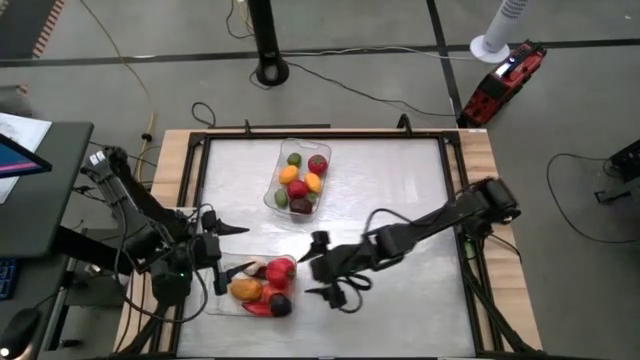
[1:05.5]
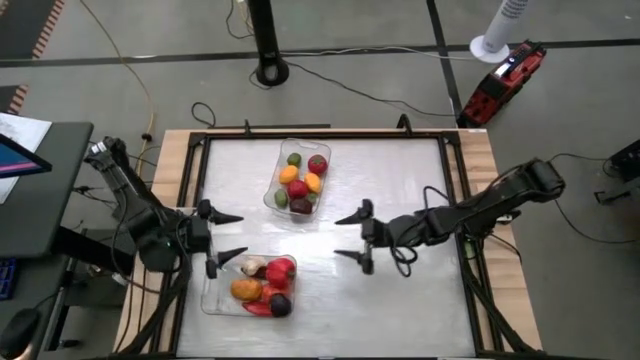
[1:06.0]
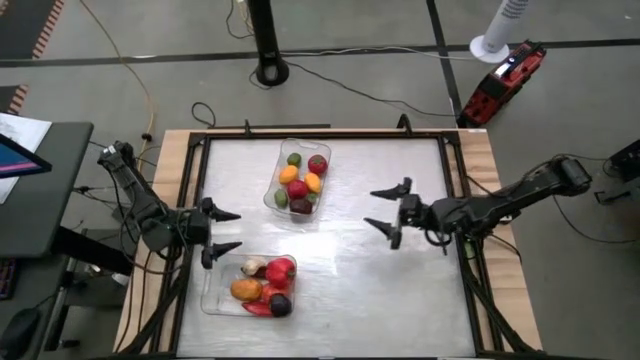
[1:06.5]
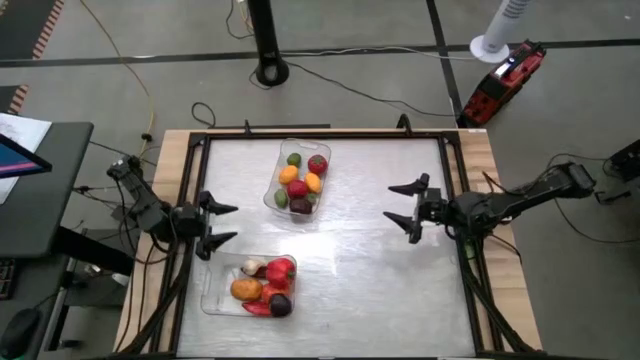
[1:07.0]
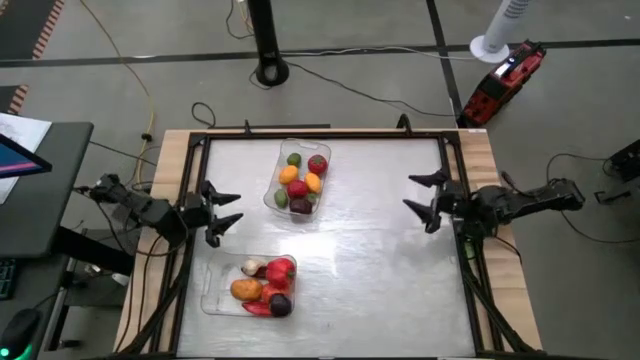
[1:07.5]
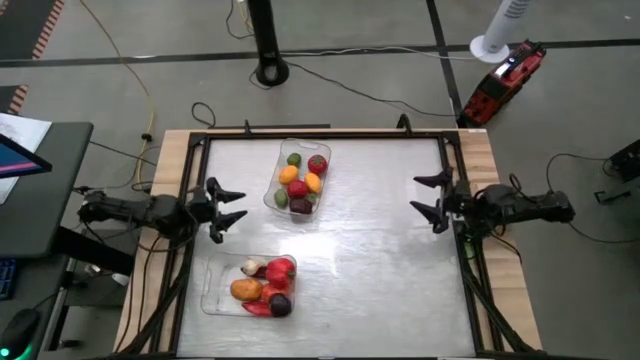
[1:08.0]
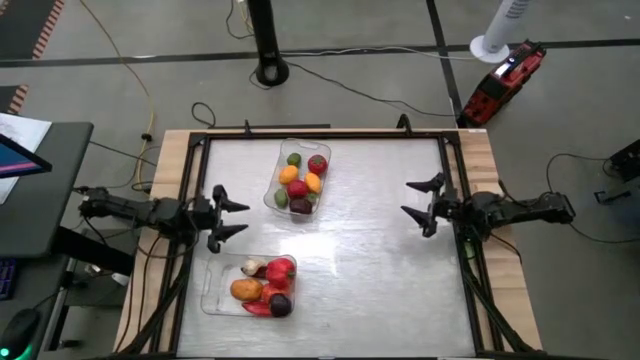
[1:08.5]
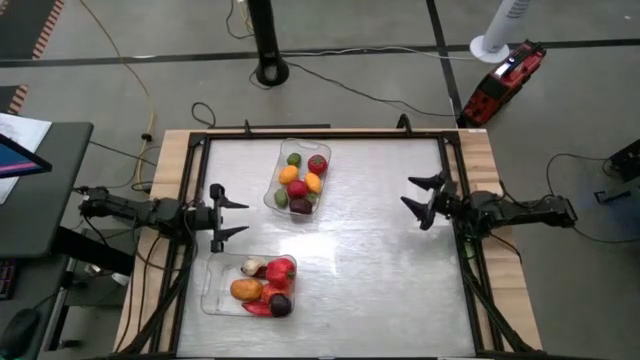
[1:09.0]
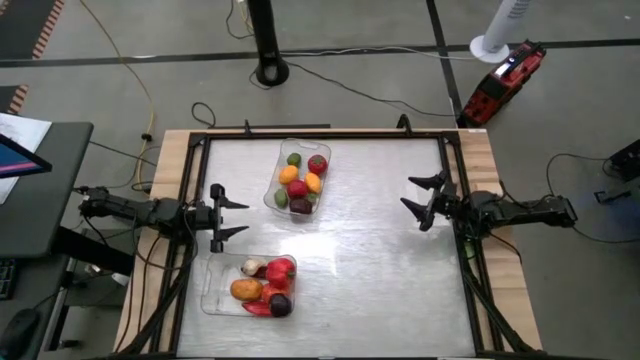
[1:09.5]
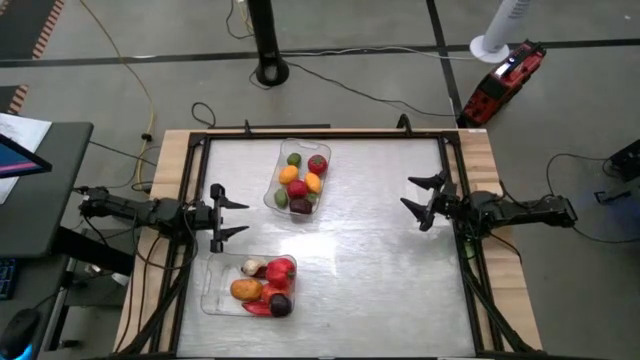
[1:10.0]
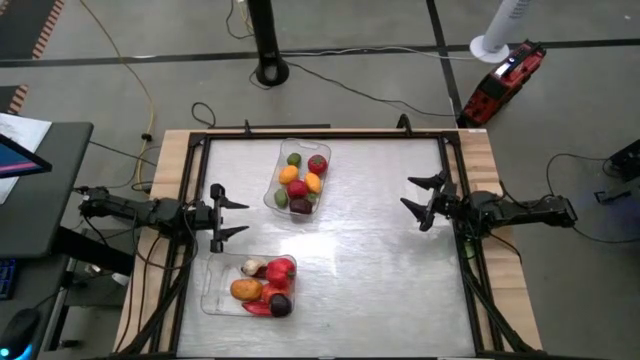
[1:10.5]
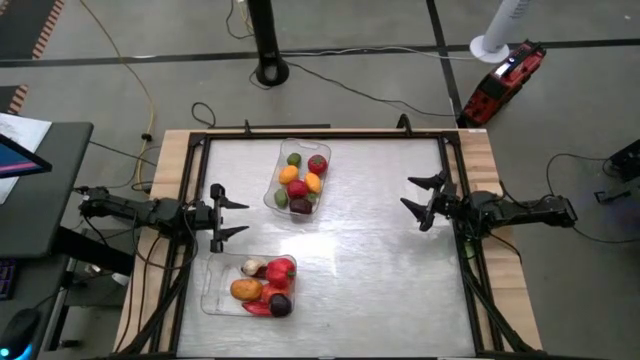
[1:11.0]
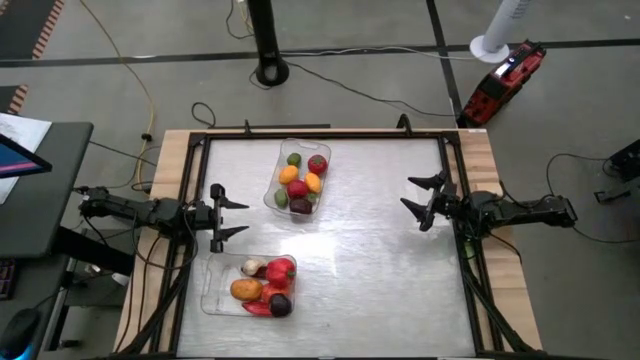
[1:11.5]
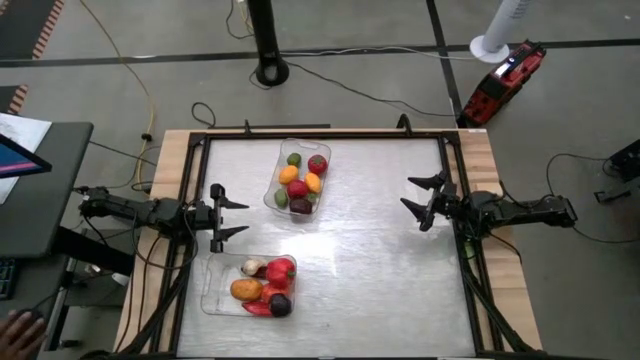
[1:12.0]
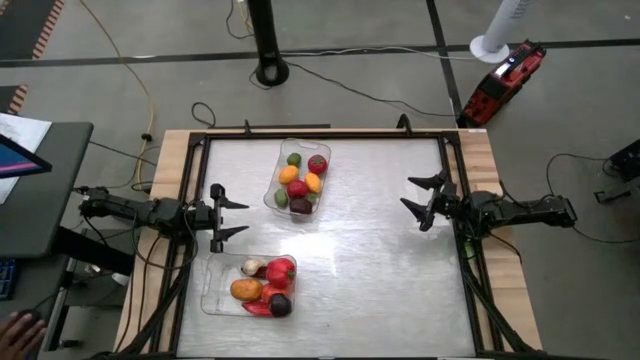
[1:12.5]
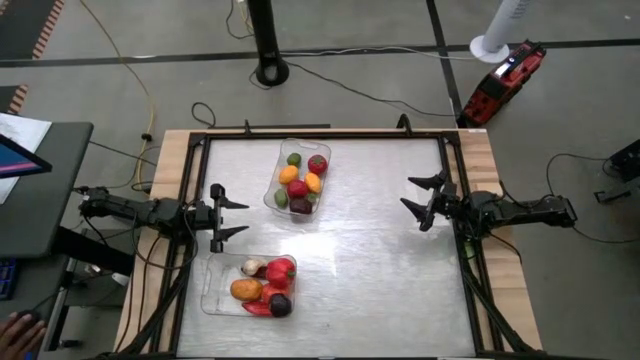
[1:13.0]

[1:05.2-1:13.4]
Task: Sort produce into baskets
Return to Home Position

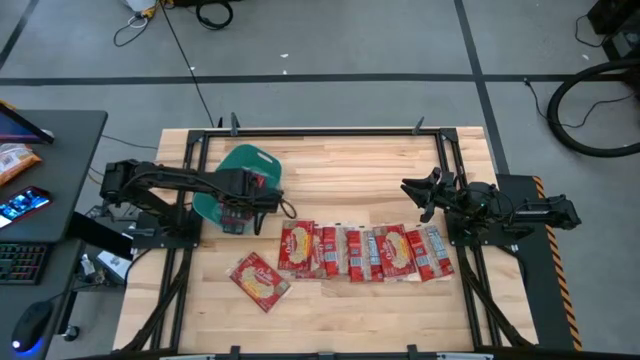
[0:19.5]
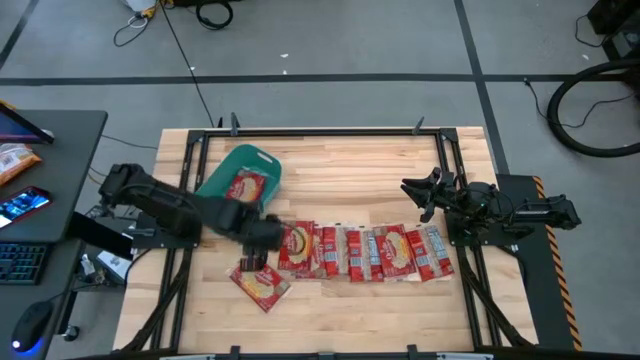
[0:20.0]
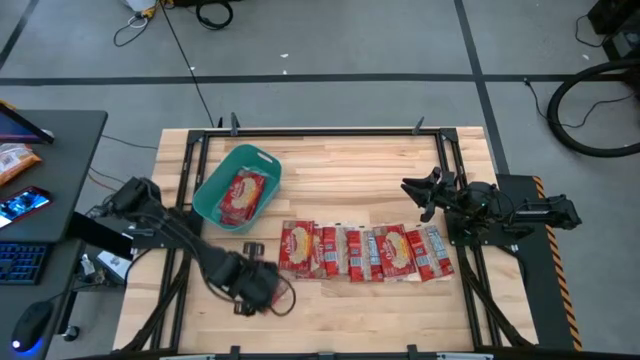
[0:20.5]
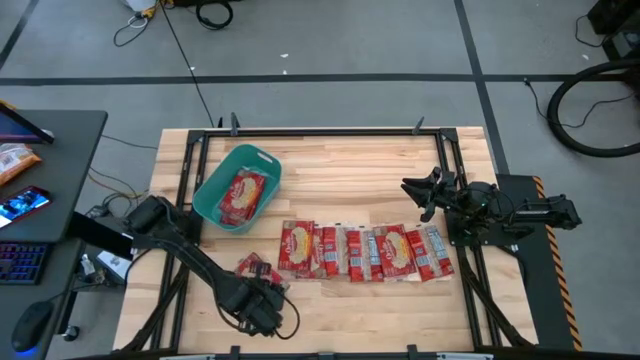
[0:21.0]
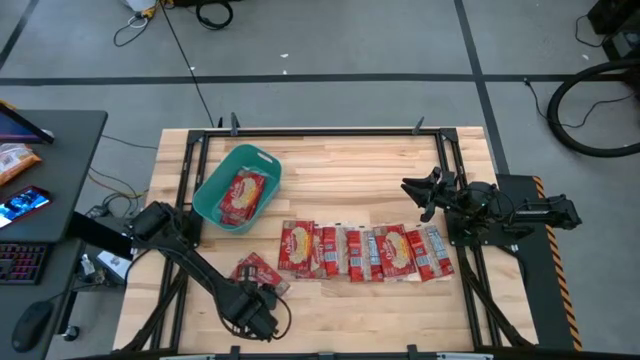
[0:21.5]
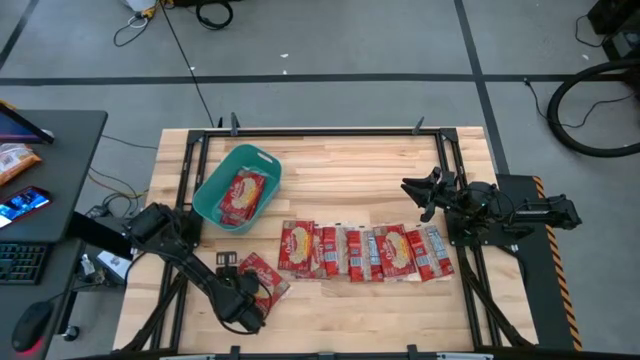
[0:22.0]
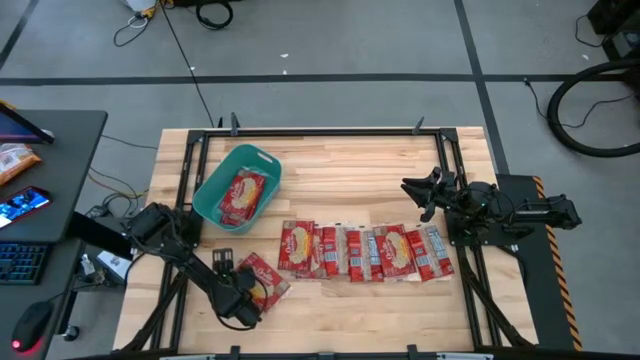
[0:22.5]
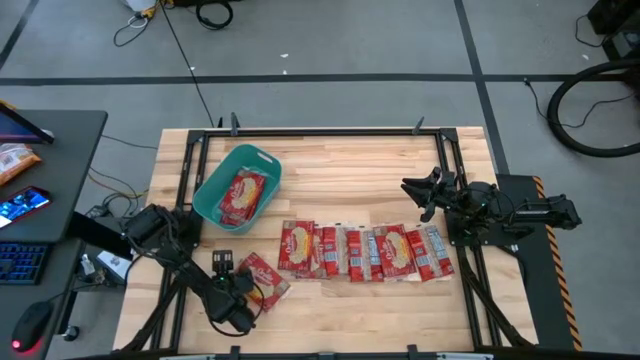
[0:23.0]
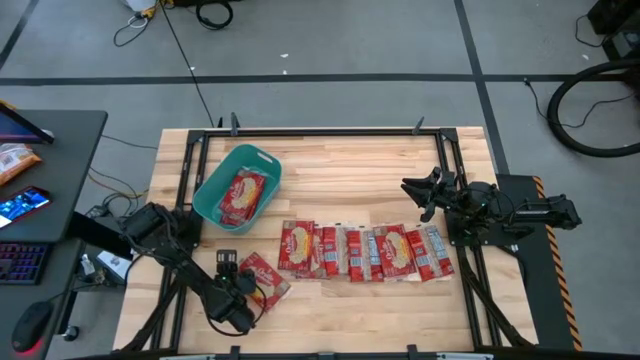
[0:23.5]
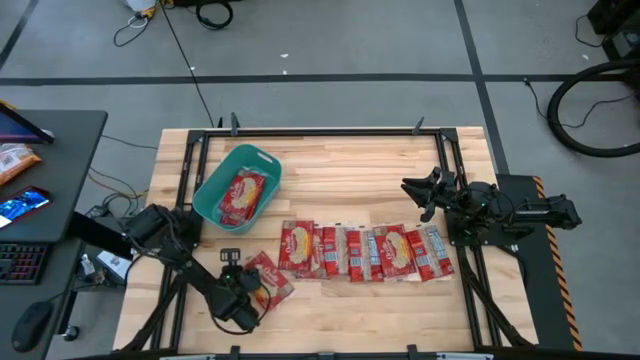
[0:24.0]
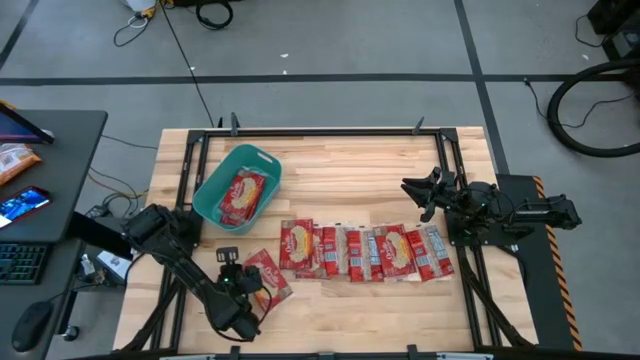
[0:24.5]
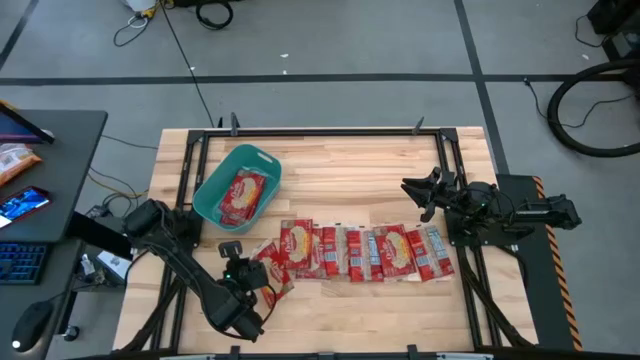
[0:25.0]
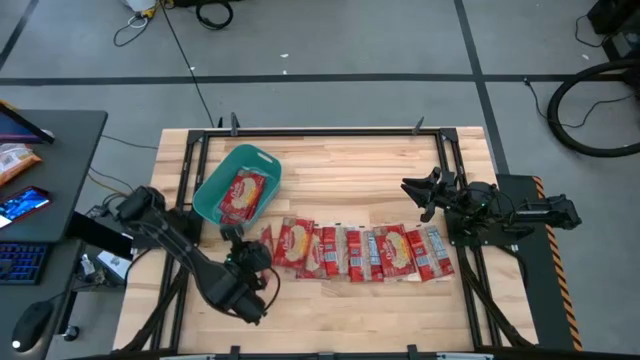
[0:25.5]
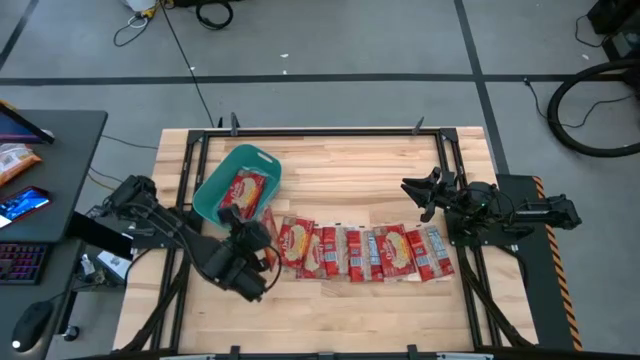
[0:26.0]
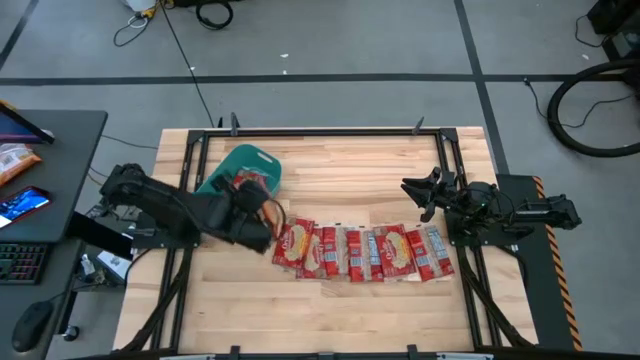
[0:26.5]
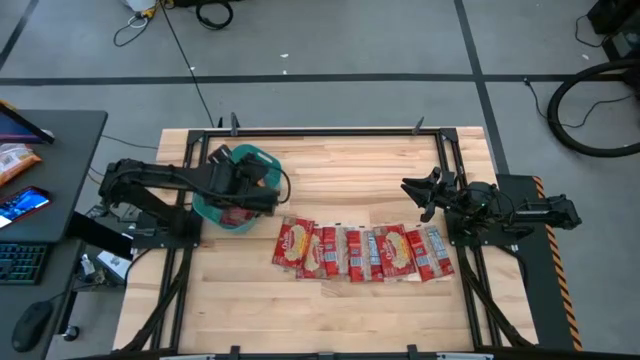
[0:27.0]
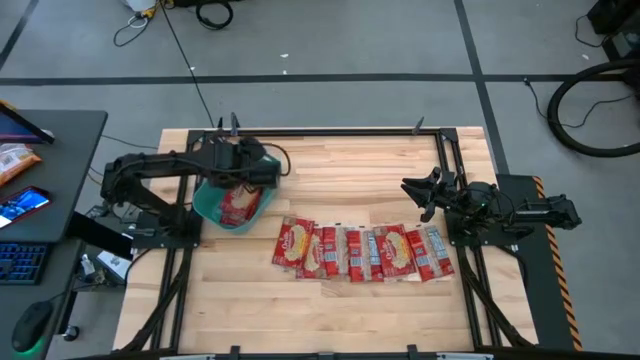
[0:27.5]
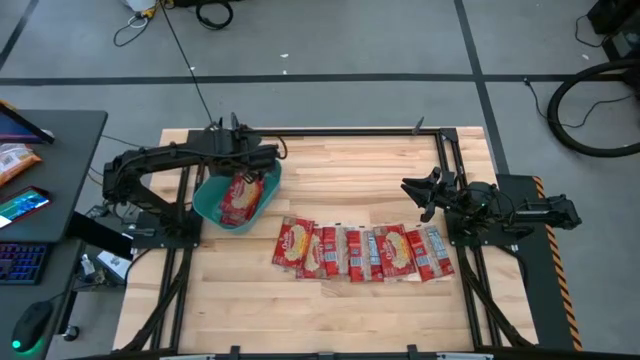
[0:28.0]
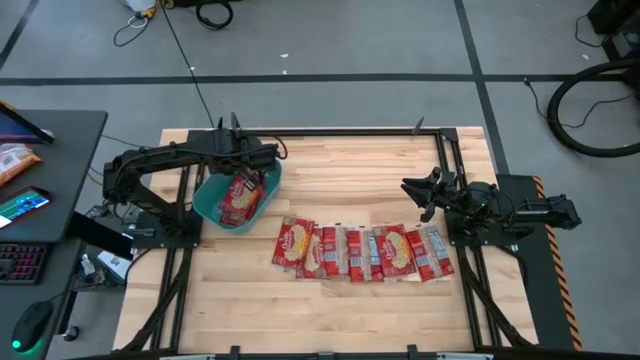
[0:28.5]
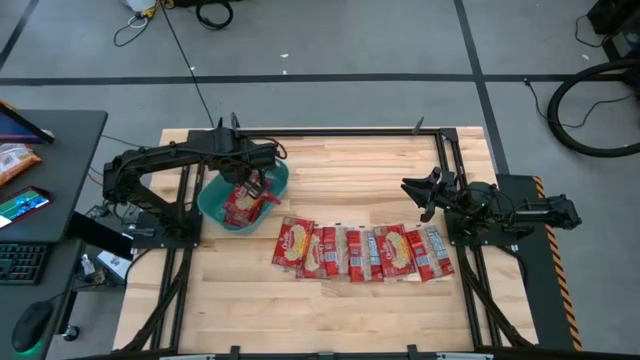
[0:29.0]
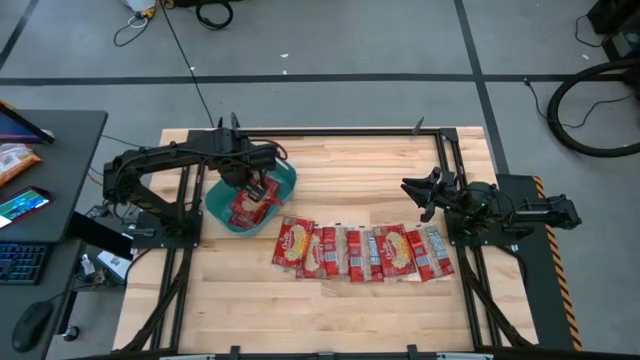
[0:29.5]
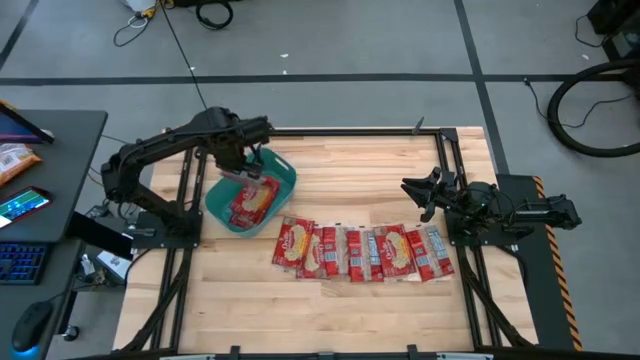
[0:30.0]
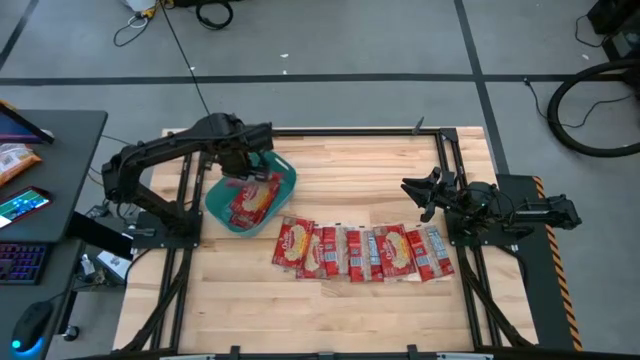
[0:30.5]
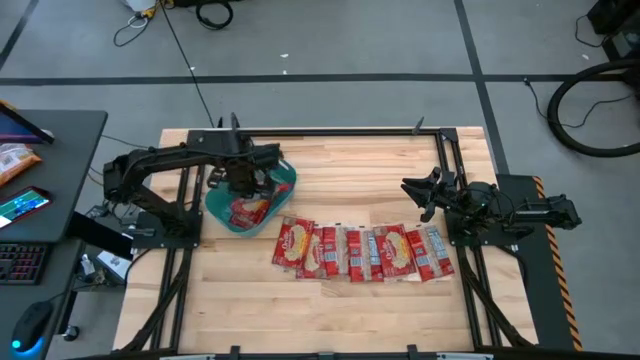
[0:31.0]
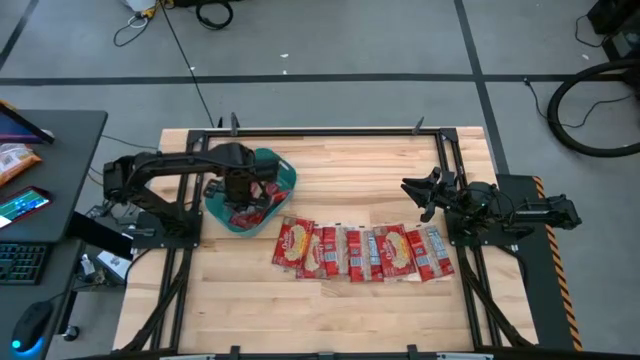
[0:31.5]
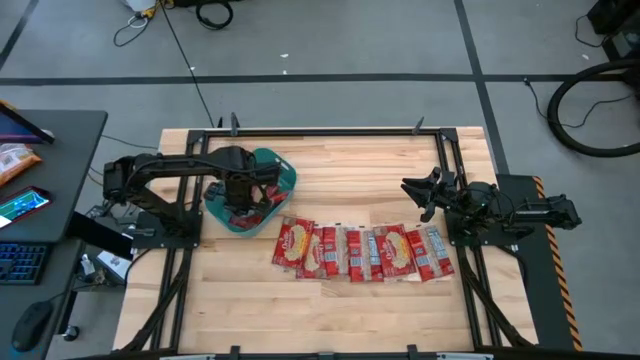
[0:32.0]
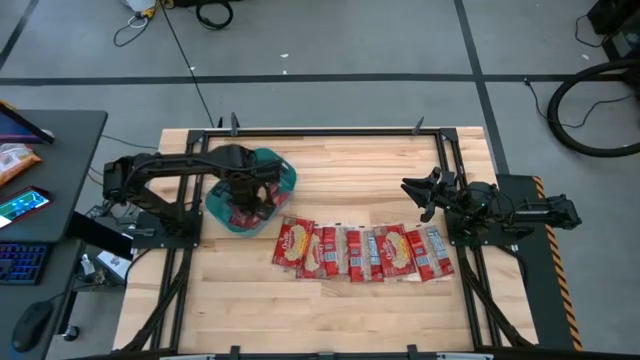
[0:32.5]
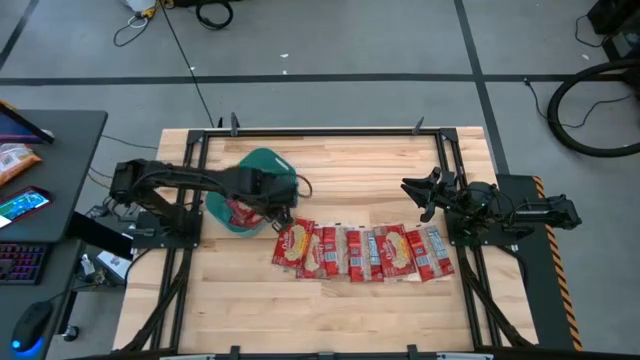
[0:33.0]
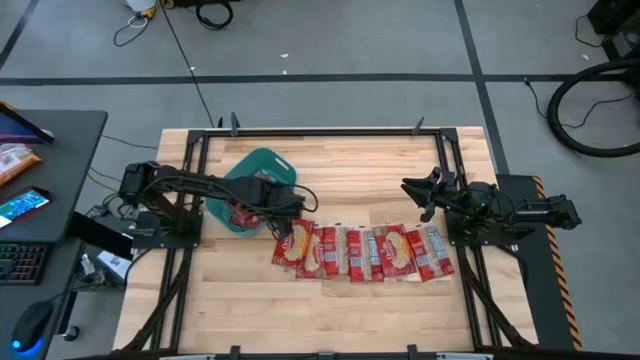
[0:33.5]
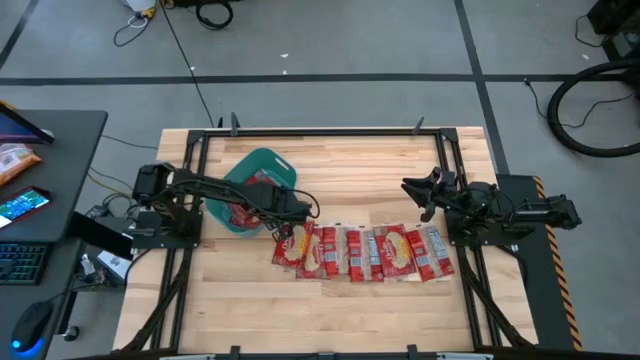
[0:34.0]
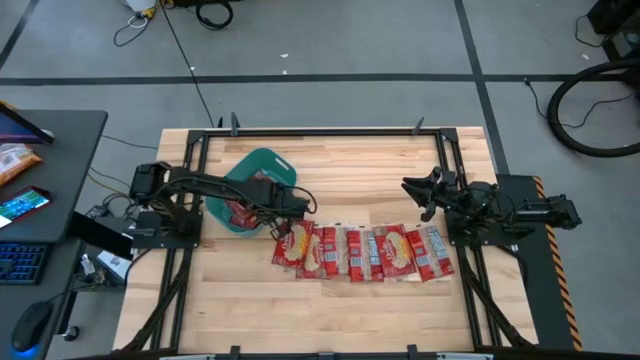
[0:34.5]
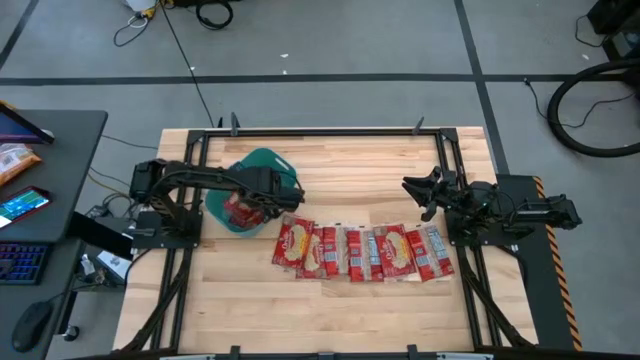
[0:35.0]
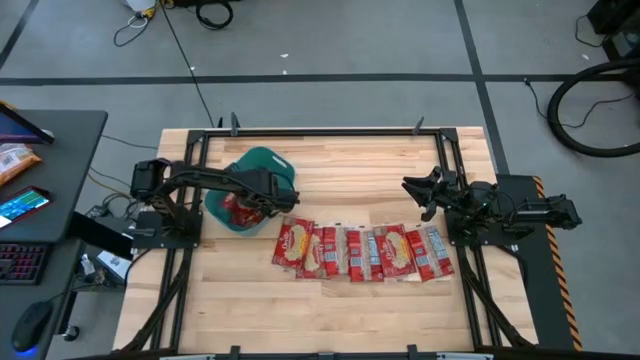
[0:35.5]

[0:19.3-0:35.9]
Task: Sort popcorn bags into baskets
Put the red popcorn bag into the green bin
